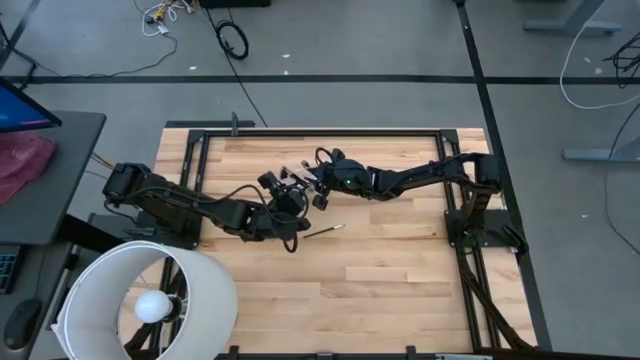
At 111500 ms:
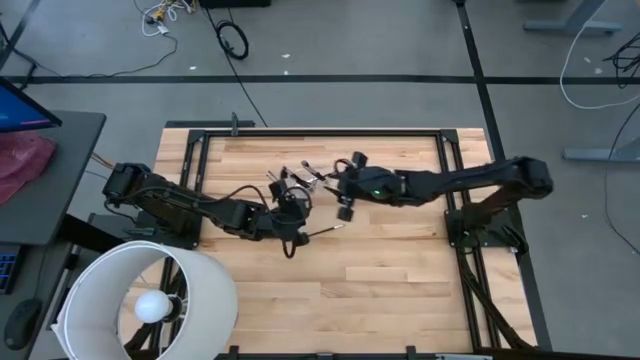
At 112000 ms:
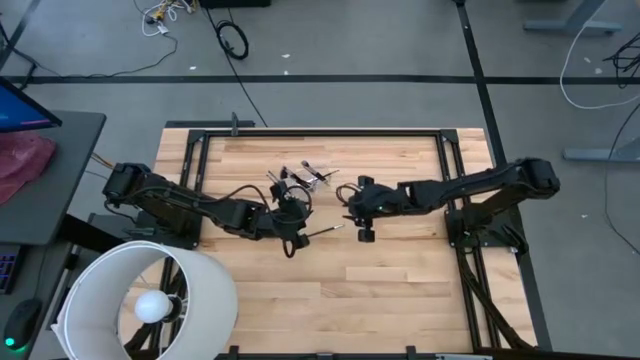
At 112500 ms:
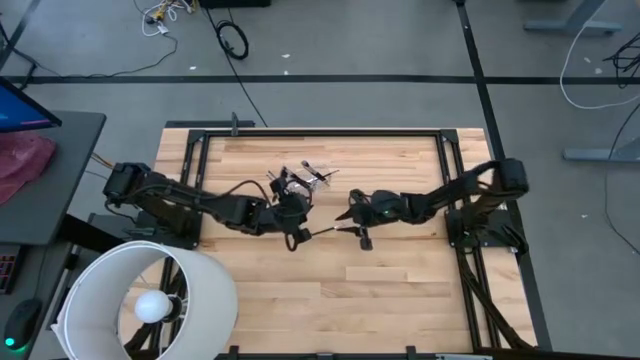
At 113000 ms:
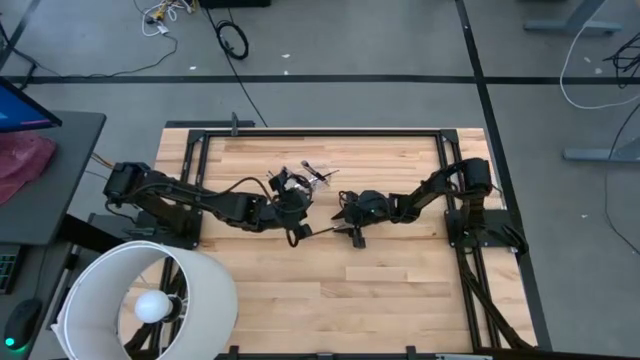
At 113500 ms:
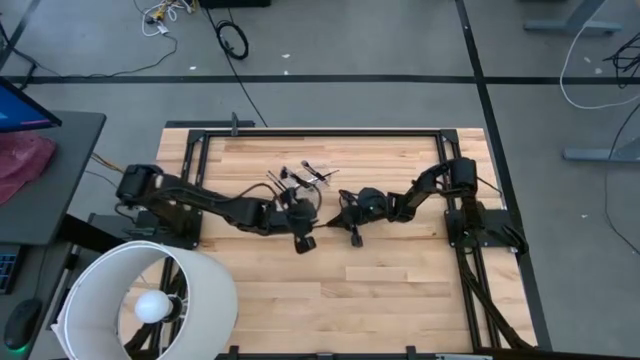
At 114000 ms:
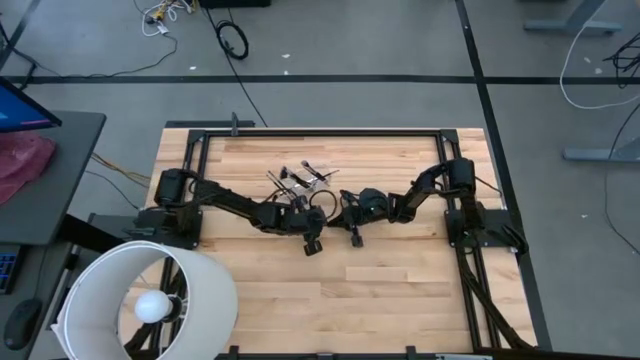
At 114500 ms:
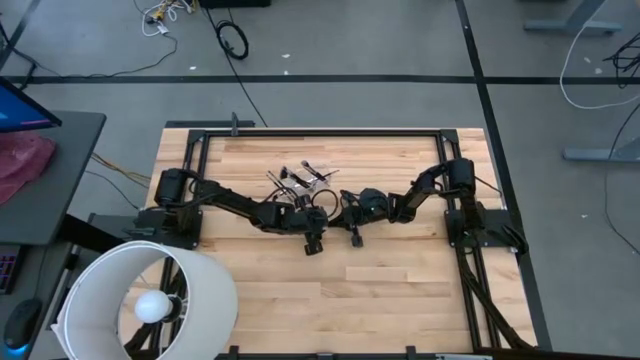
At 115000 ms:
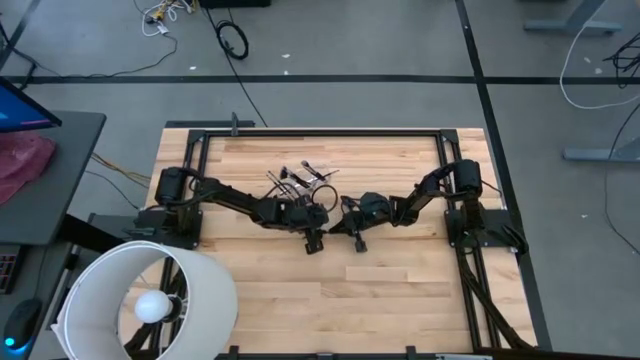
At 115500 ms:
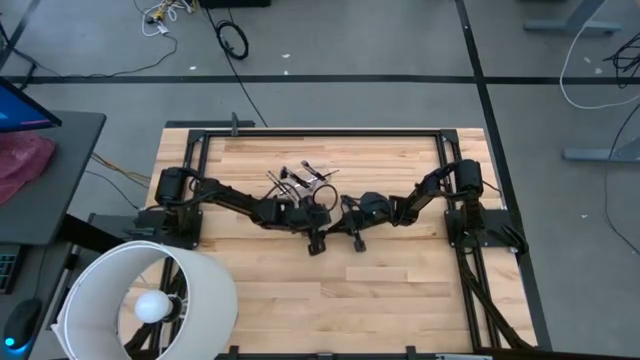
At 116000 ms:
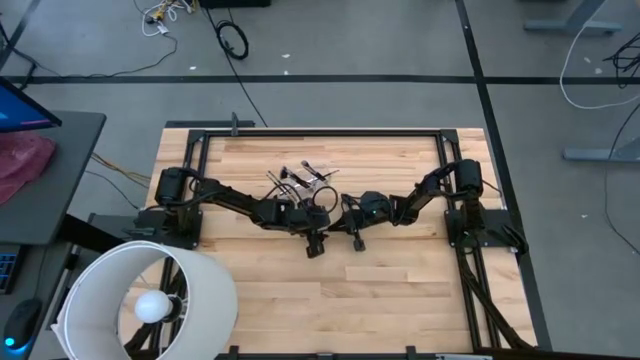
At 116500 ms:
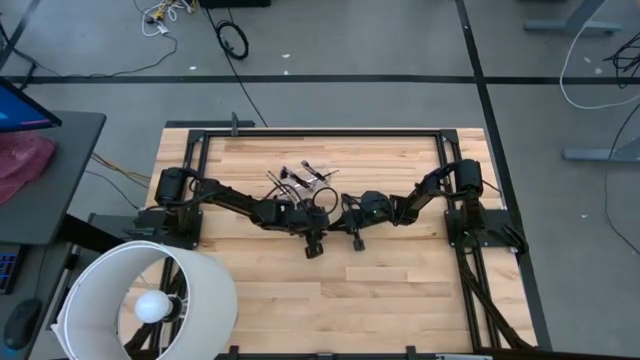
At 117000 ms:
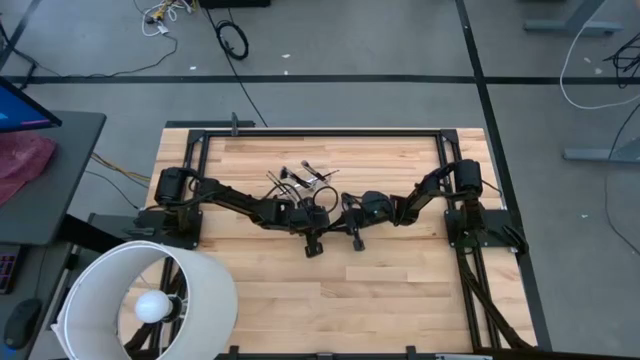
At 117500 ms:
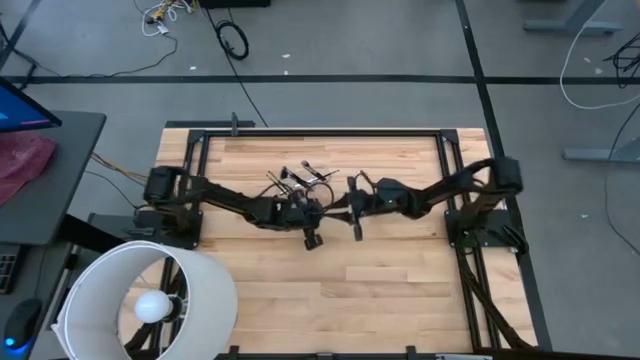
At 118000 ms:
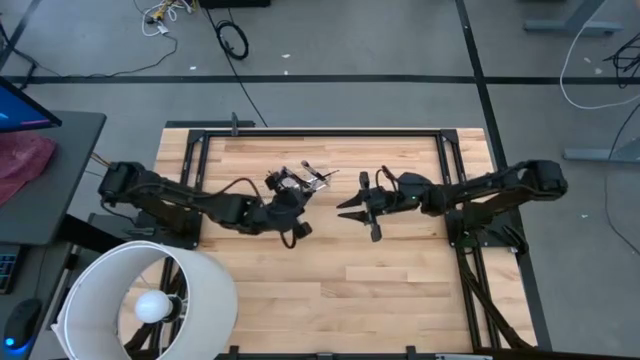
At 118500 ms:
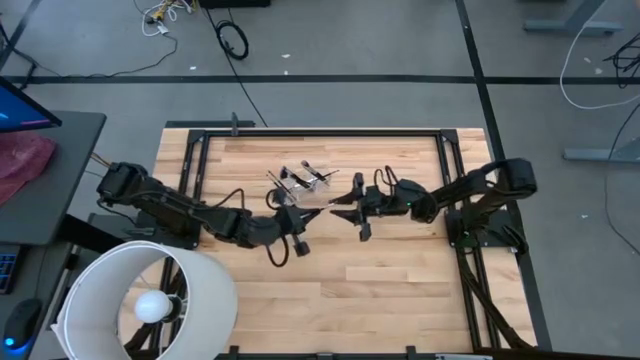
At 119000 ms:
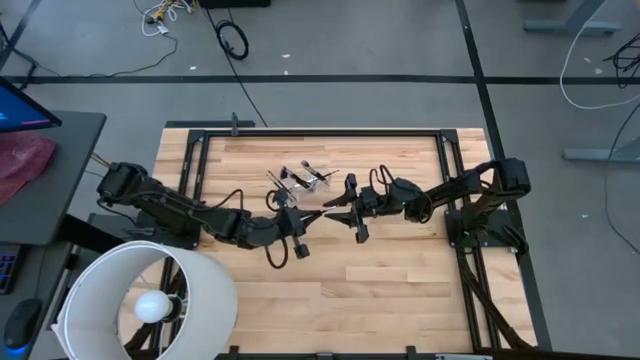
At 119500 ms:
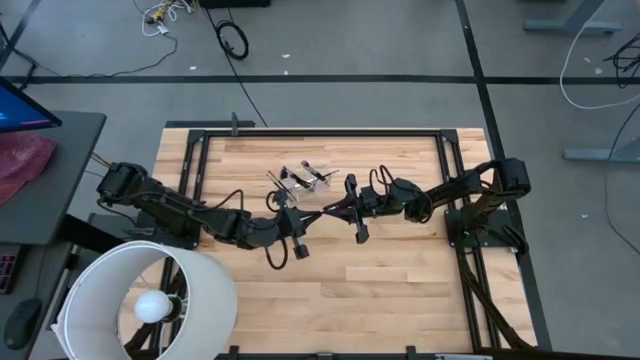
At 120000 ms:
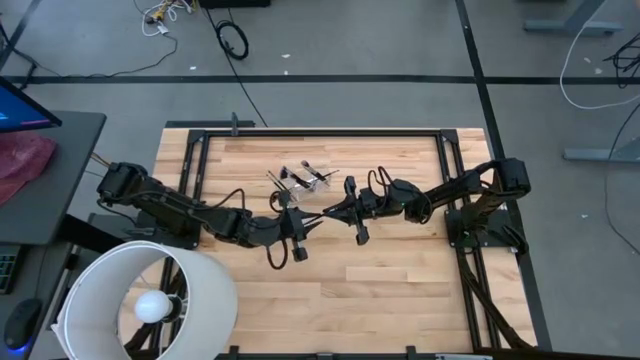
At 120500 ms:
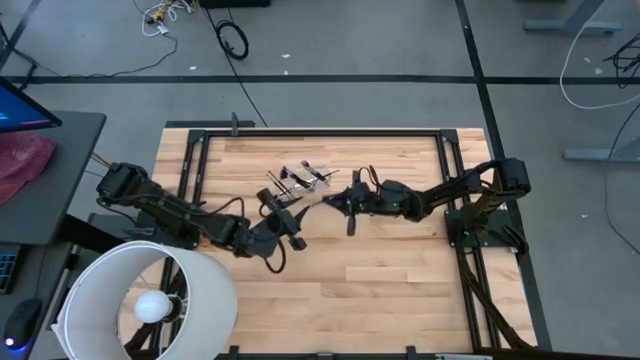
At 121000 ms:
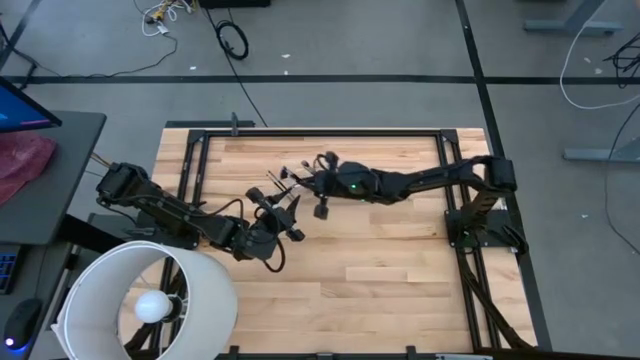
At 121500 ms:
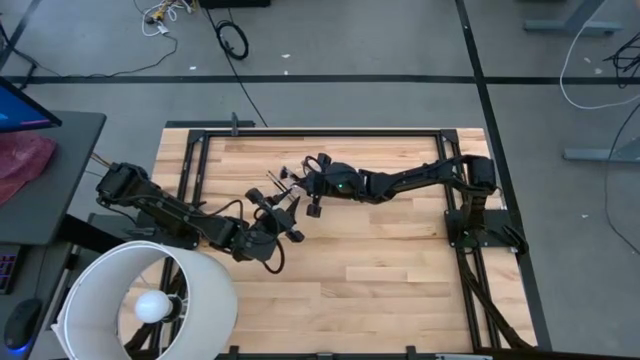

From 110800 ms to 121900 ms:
Task: Put items in baskets/containers
Put the black eyeshadow brush into the transparent organizer

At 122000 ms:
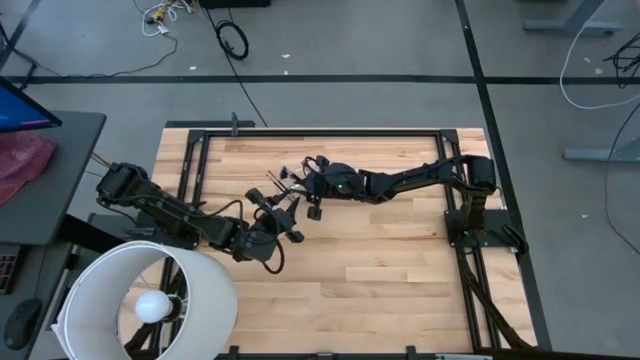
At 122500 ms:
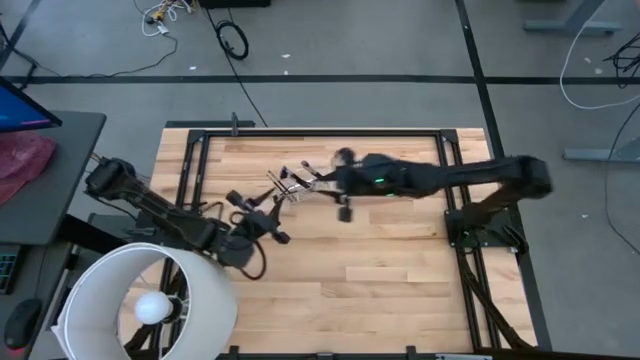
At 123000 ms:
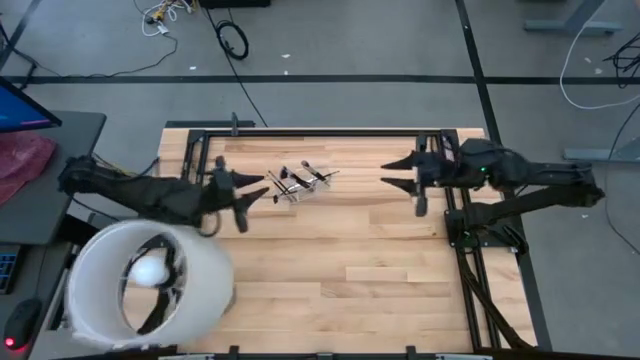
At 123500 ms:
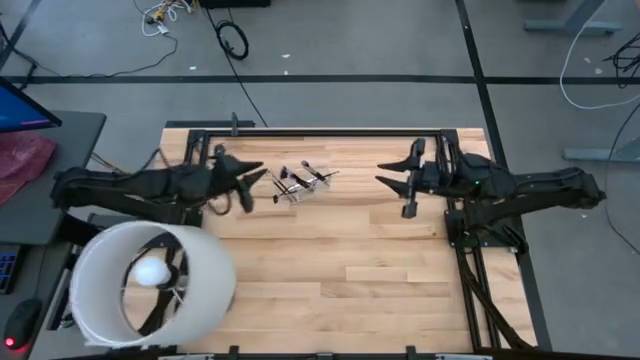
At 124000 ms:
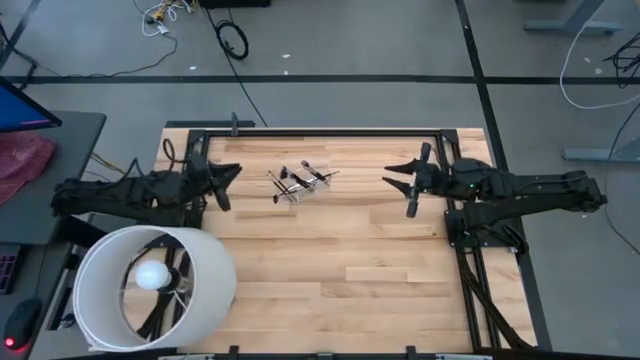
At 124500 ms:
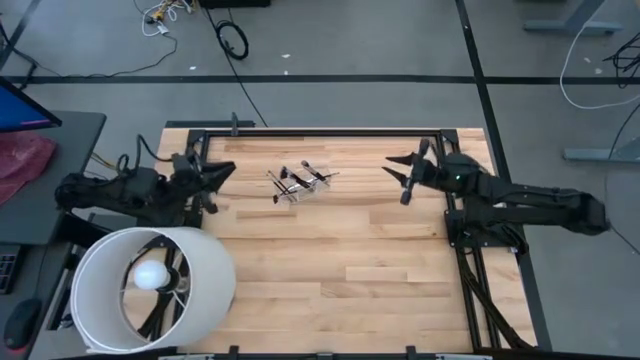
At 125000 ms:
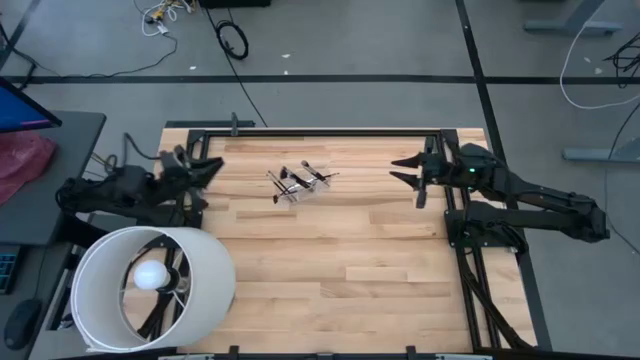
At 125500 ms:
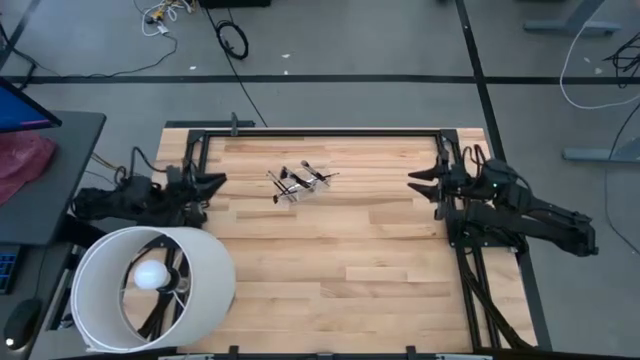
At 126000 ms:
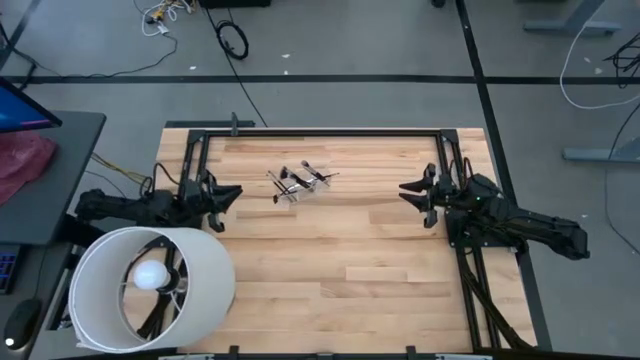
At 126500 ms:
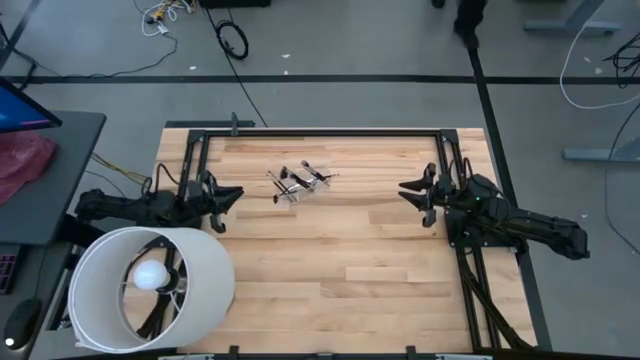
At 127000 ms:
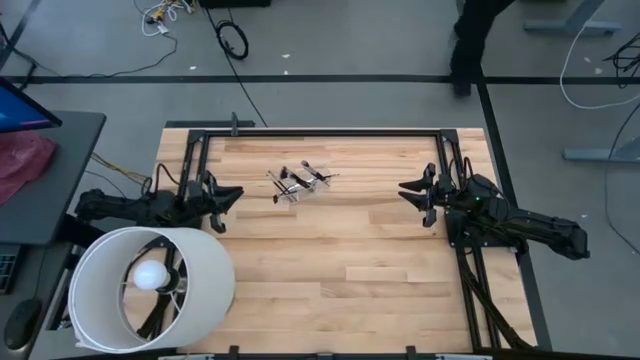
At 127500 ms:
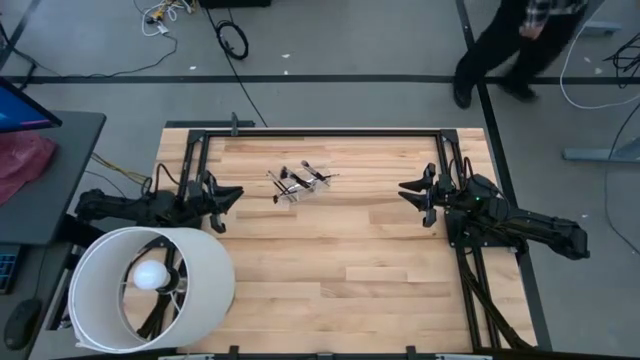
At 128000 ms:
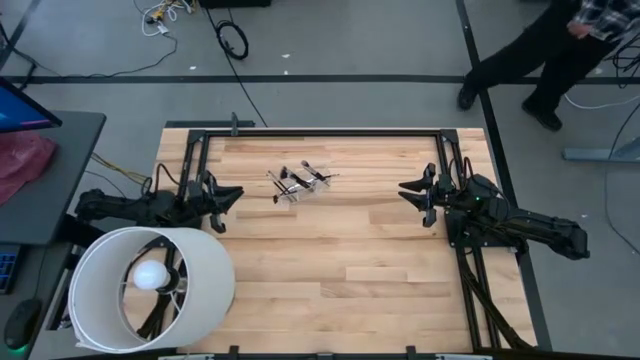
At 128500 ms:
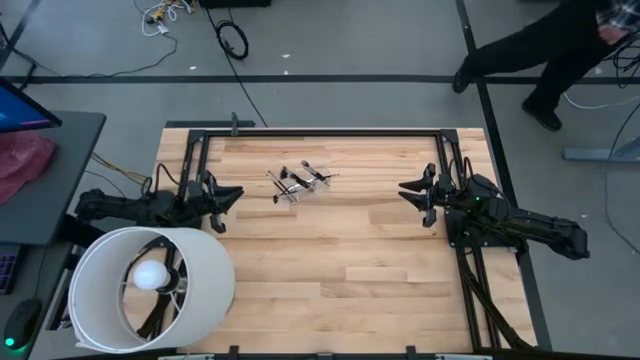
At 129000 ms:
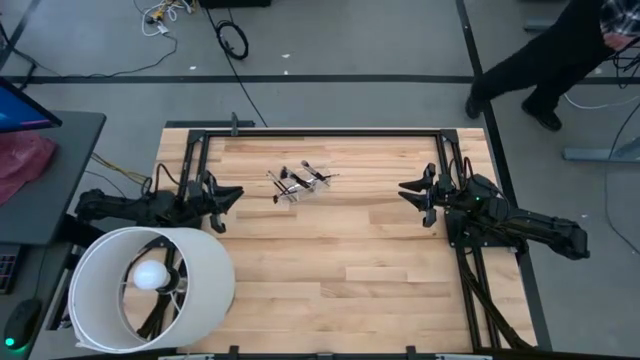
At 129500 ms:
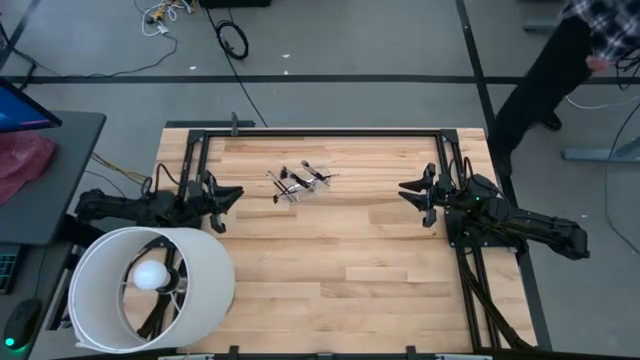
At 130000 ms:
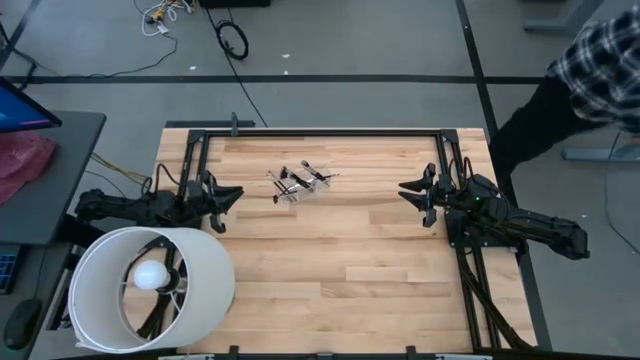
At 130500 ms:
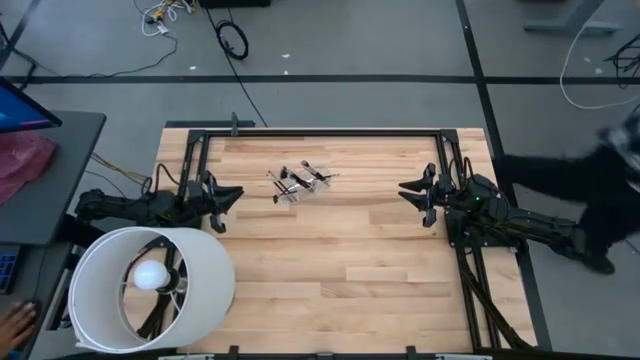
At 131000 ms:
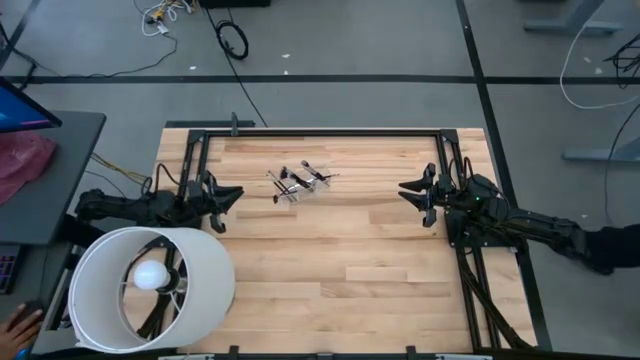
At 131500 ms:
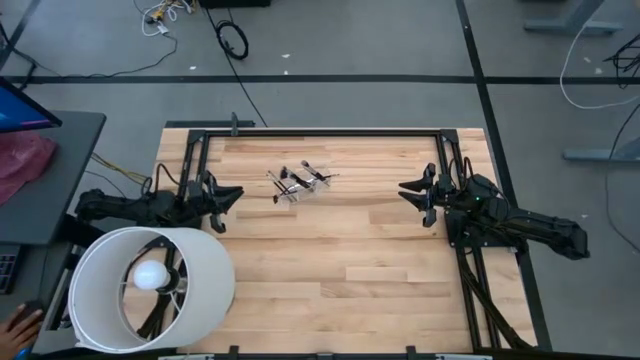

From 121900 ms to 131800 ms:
Return to Home Position
